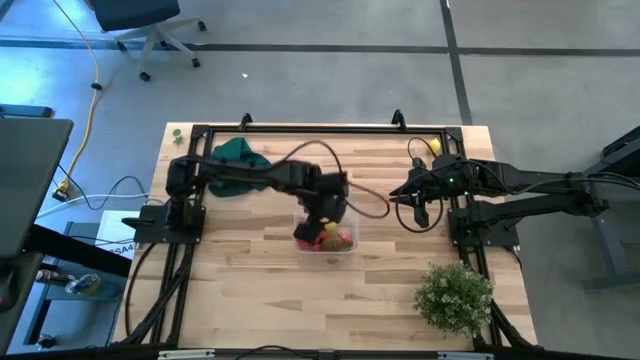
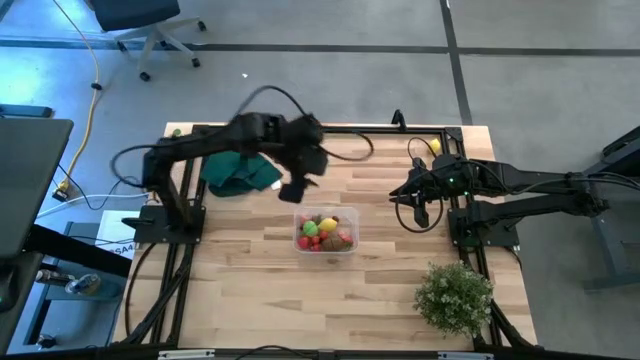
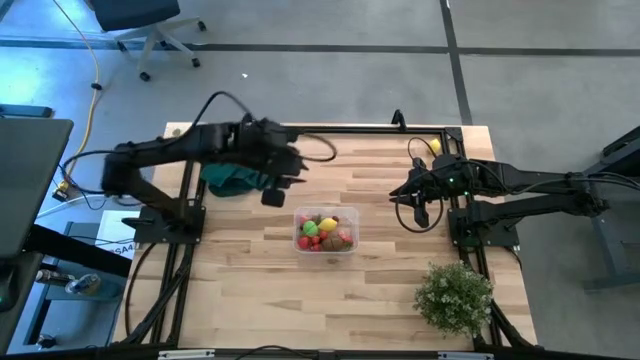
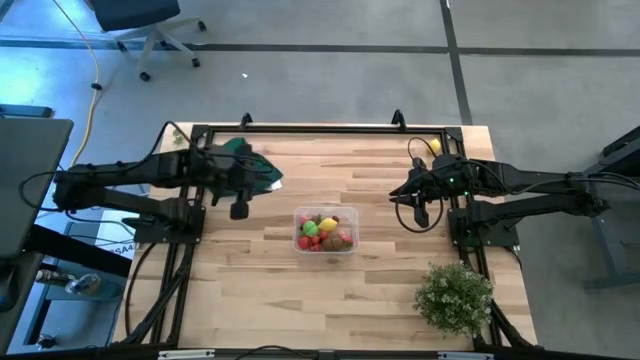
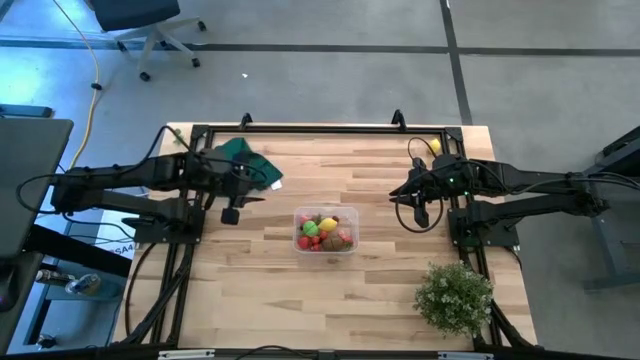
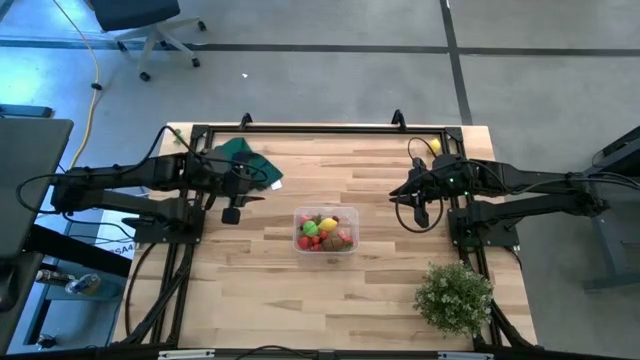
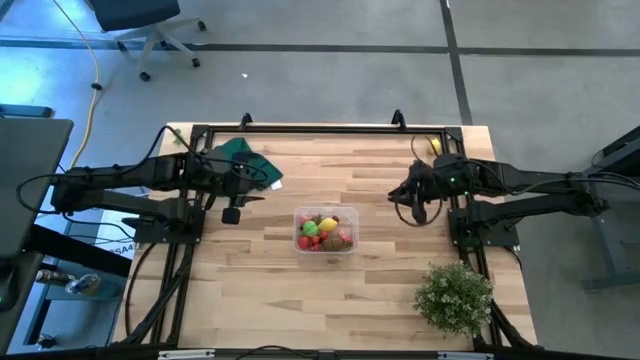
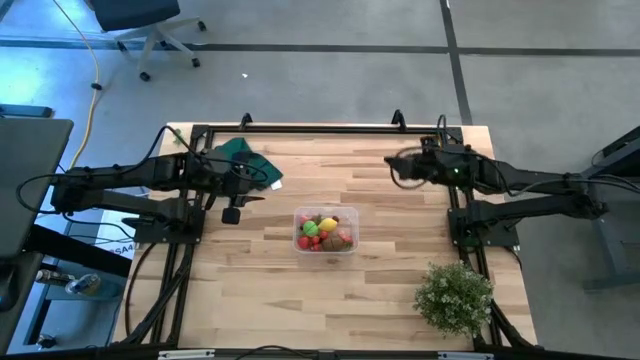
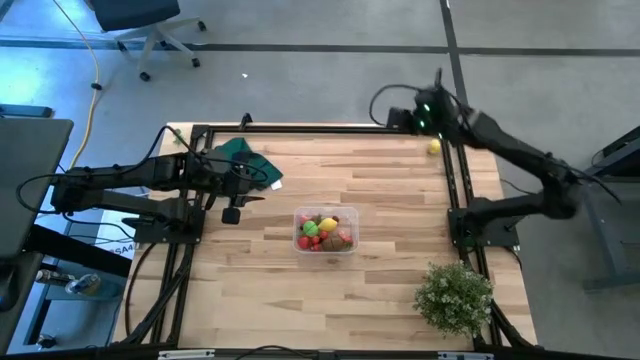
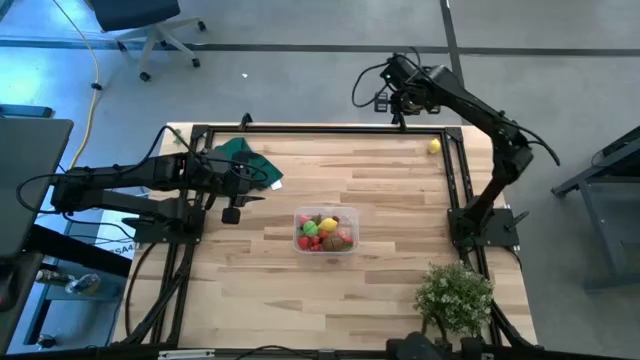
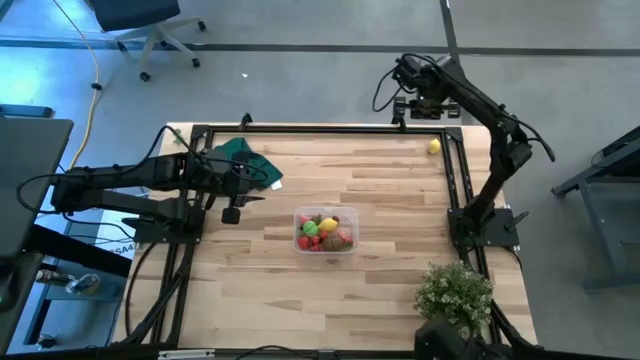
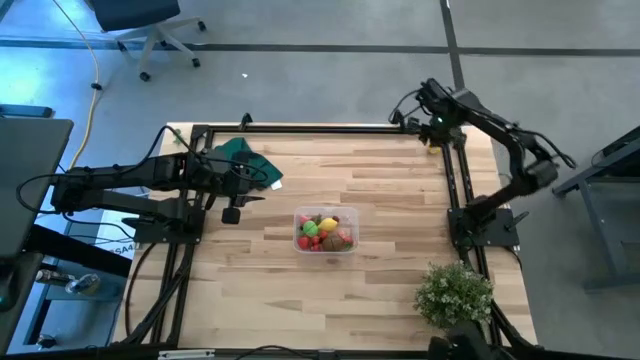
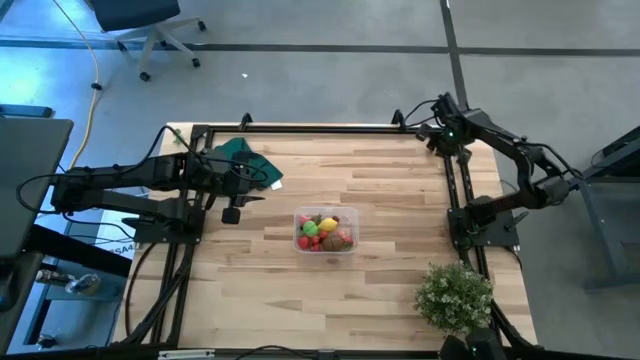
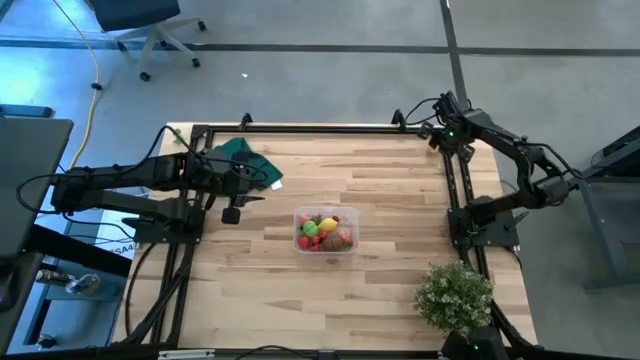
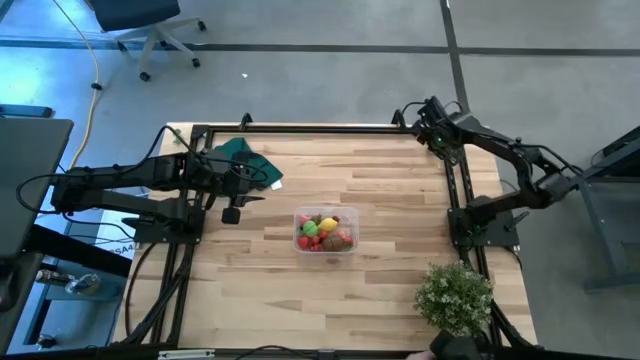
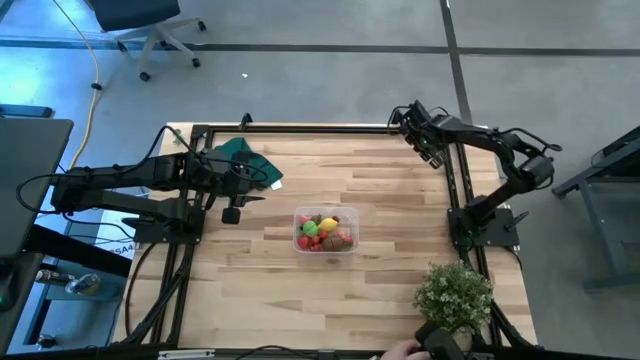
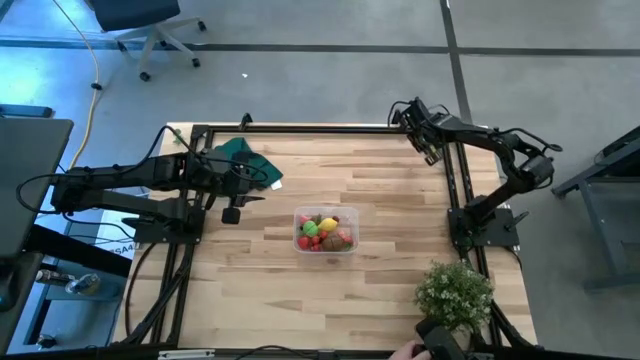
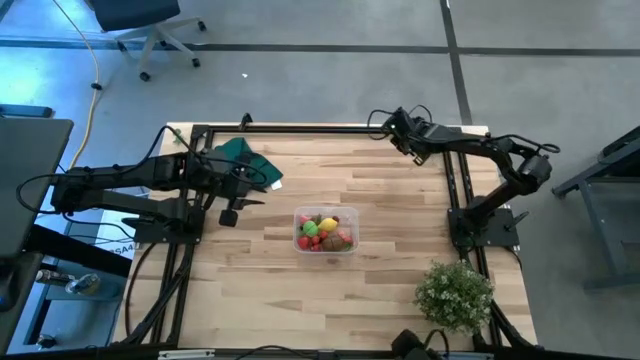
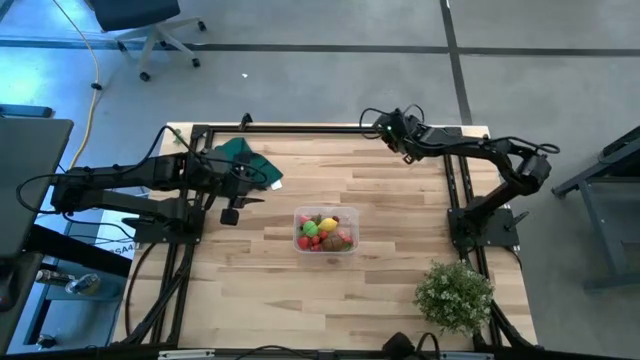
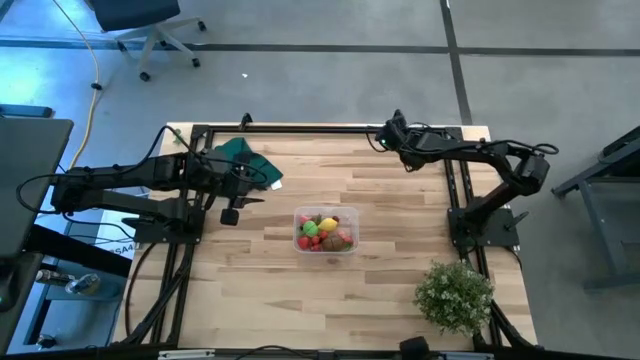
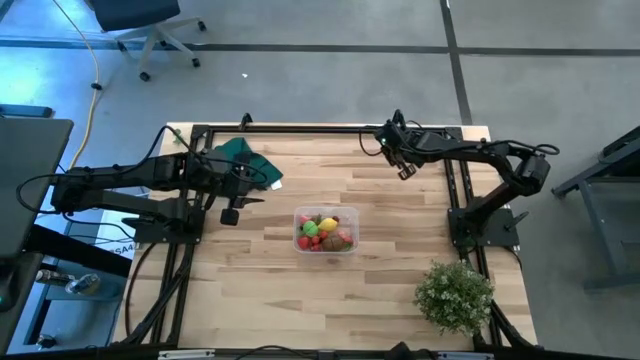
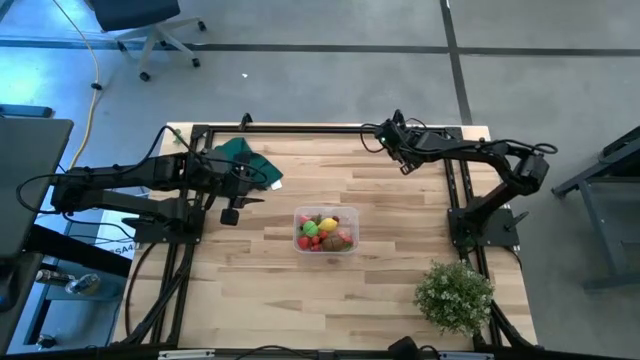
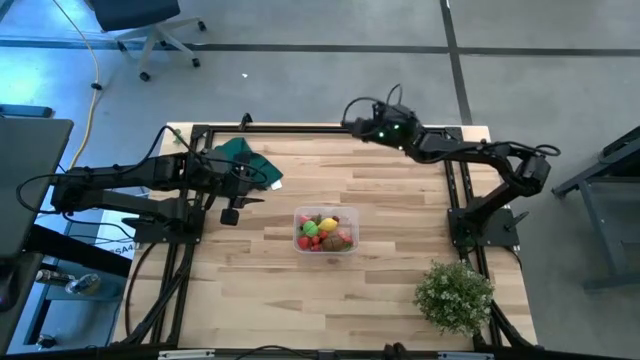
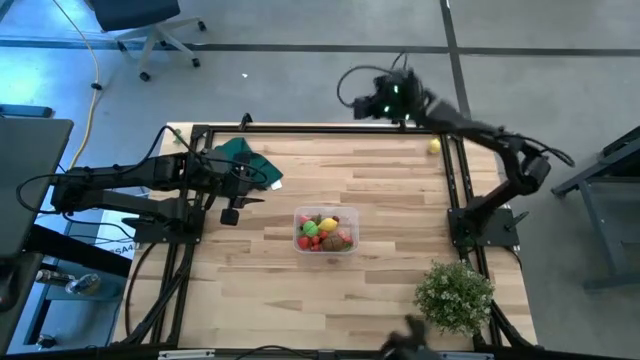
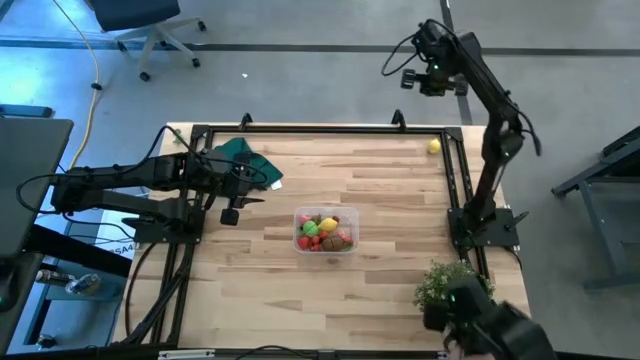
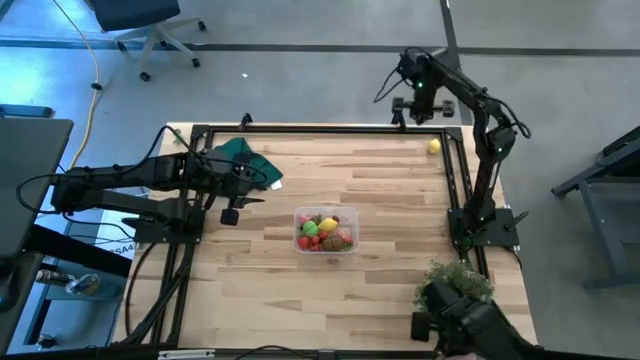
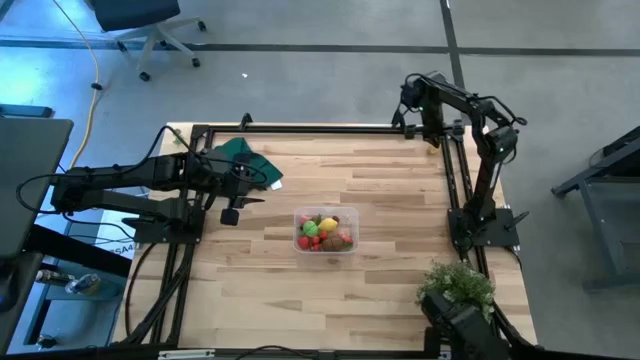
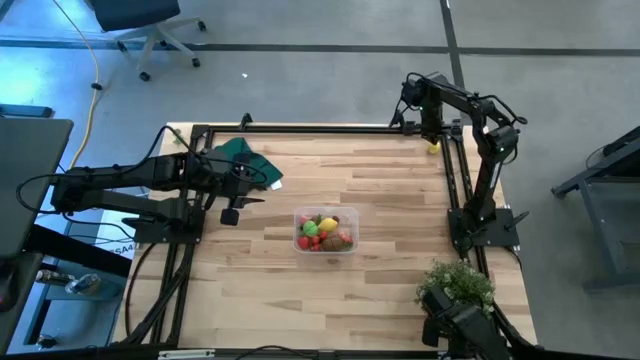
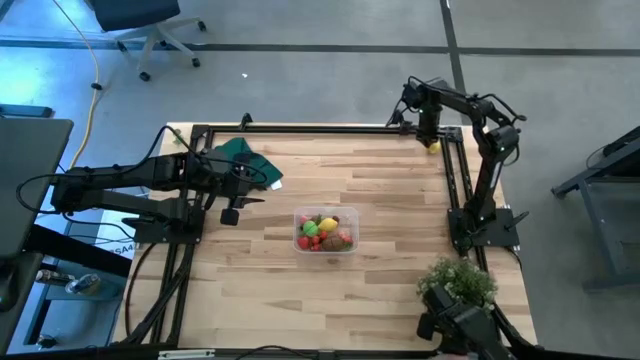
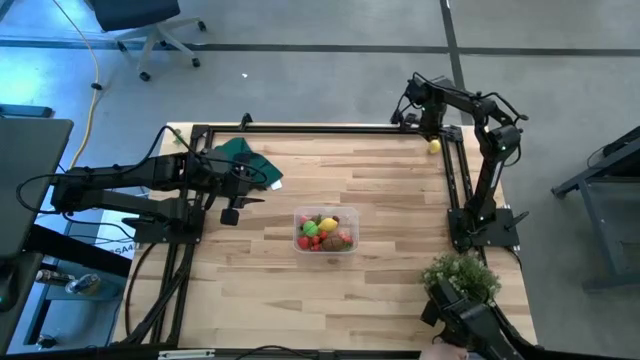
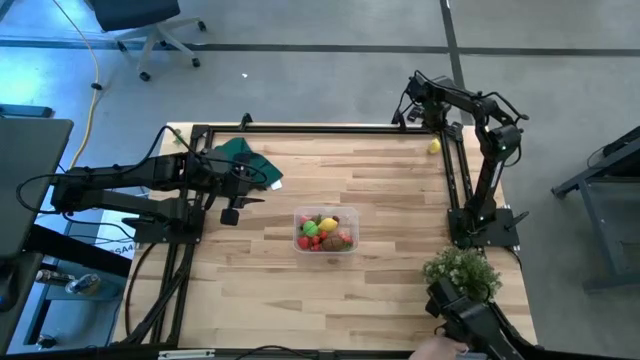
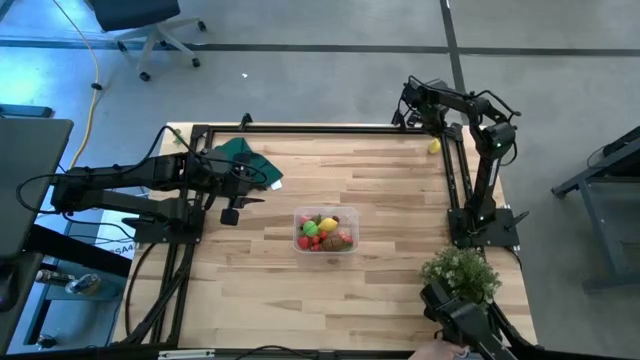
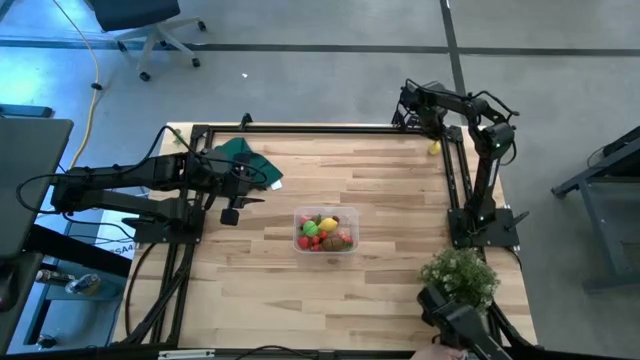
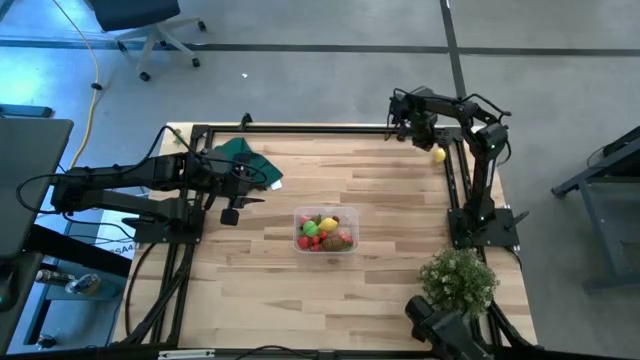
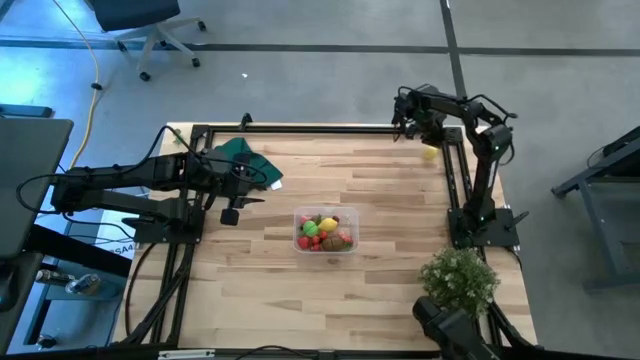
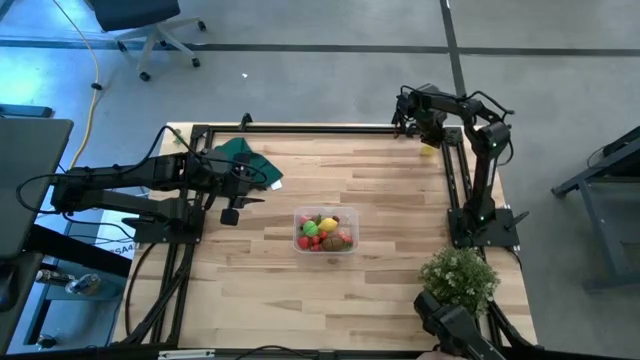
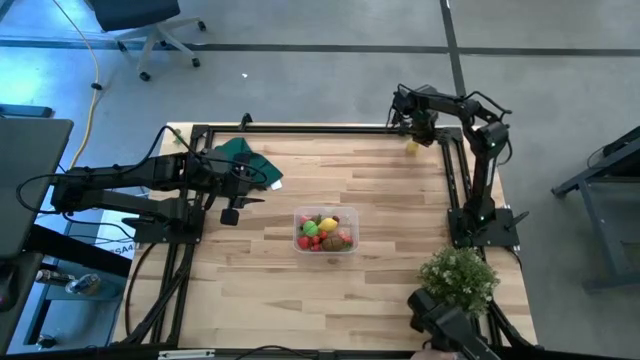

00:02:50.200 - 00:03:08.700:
Task: Pick and placing Produce into tupperware
Put the yellow lemon into the transparent bin

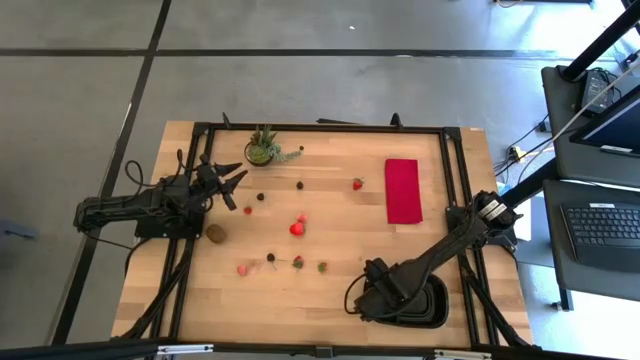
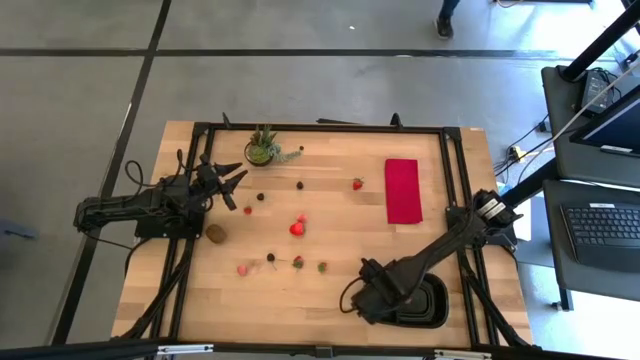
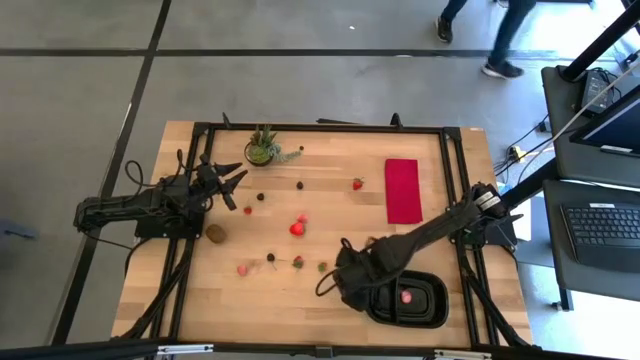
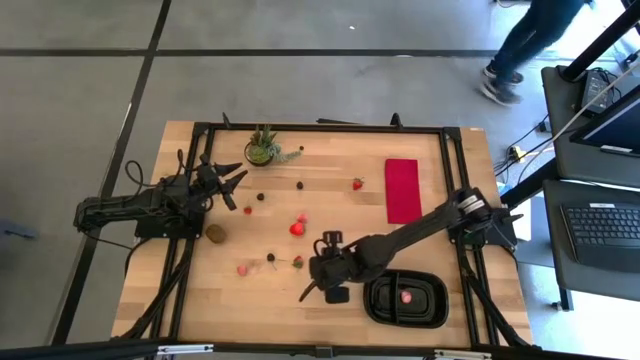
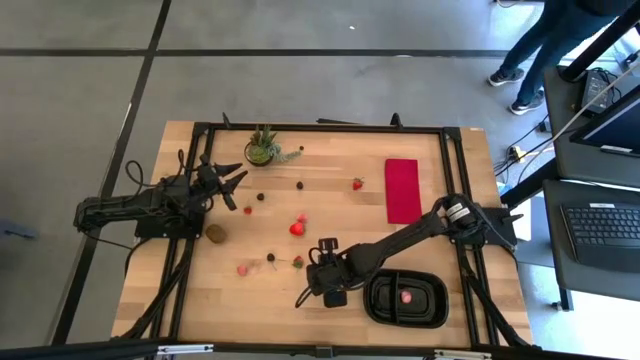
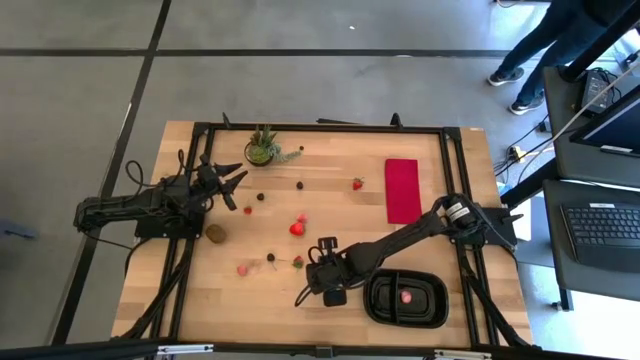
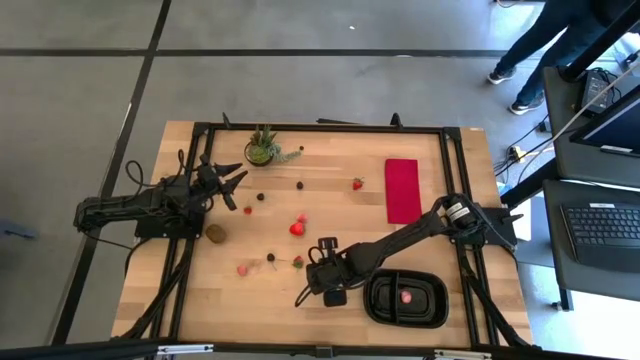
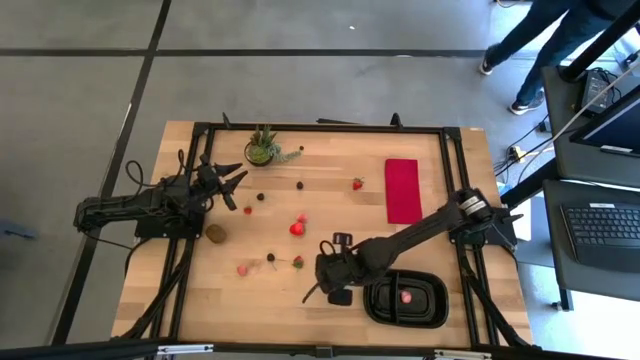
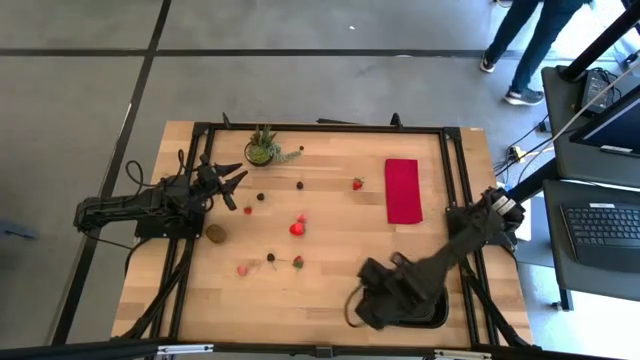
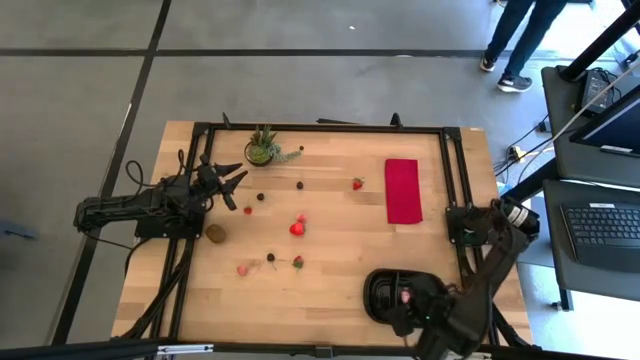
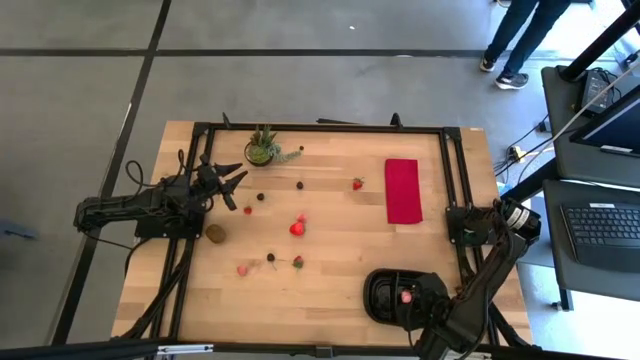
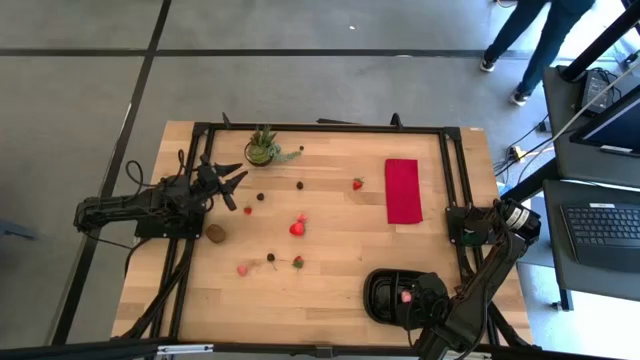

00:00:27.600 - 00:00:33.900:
Task: Pick and placing Produce into tupperware
Put the strawberry into the right of the black bin
